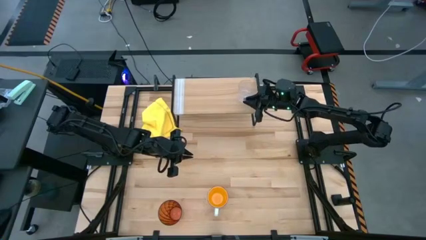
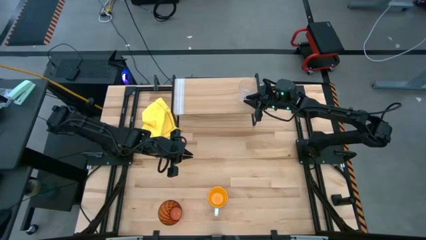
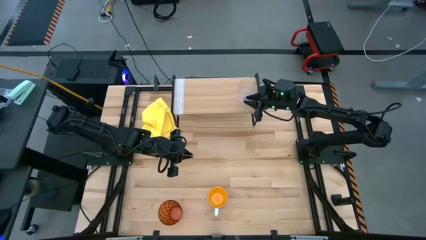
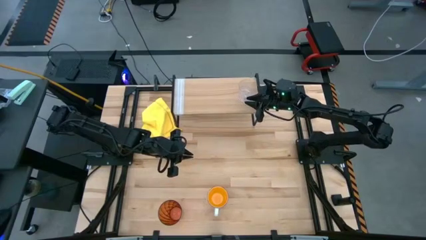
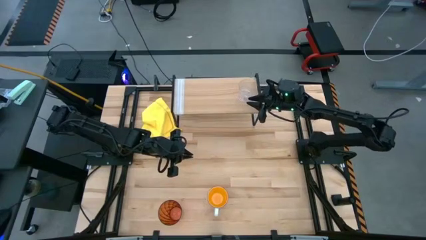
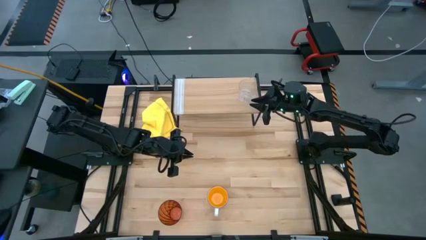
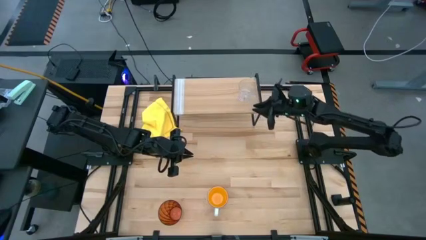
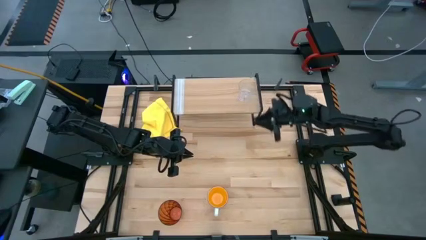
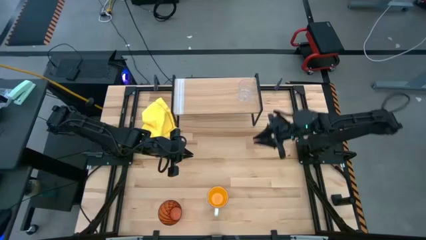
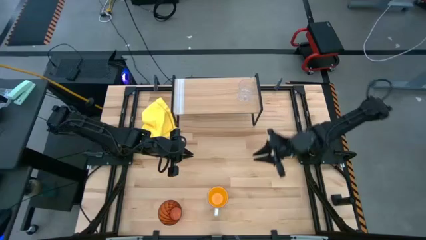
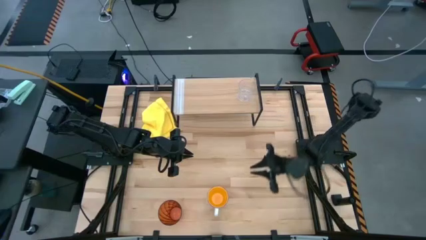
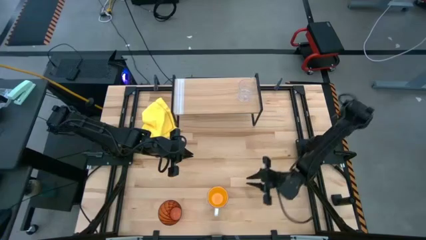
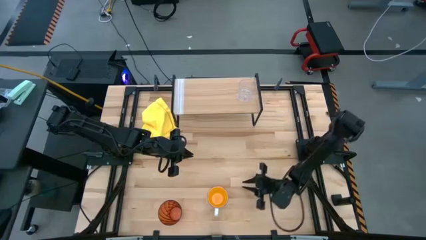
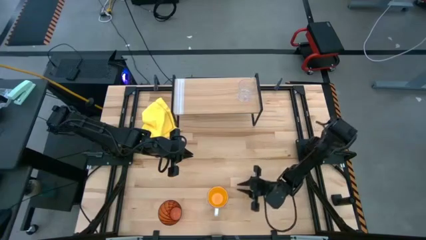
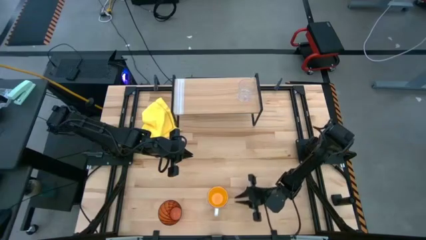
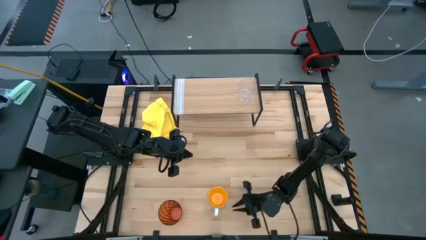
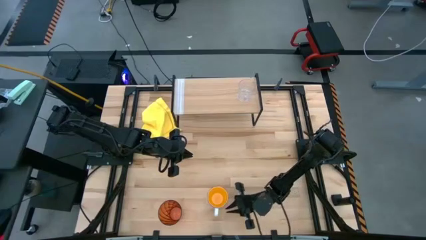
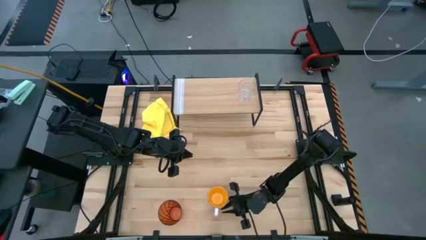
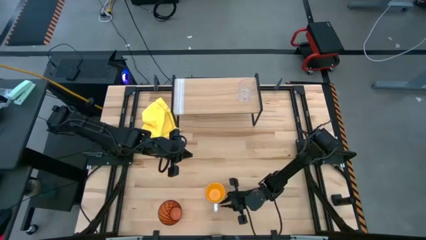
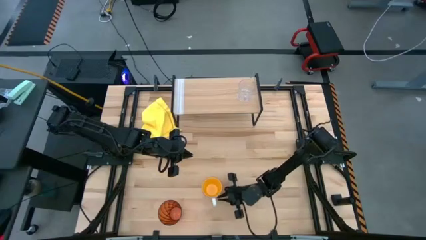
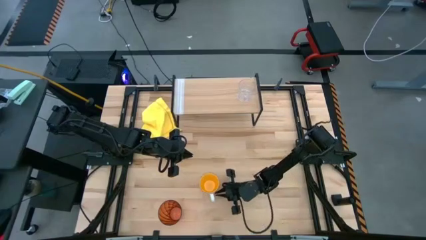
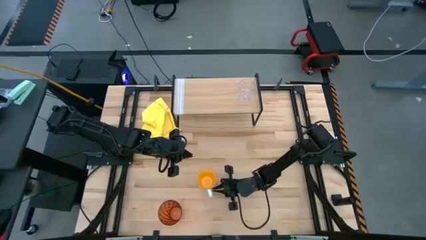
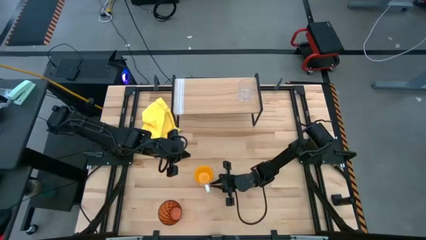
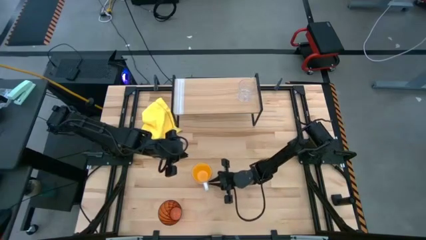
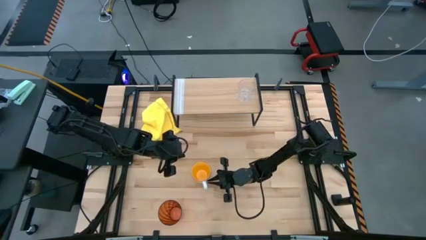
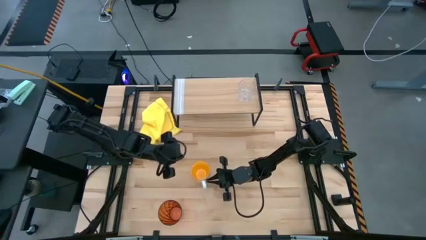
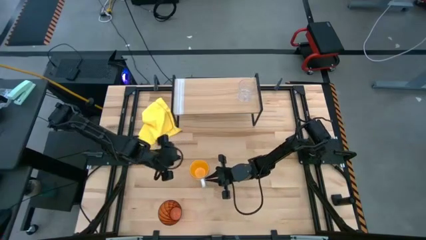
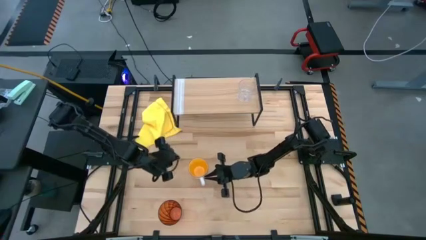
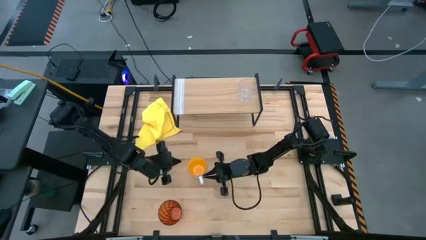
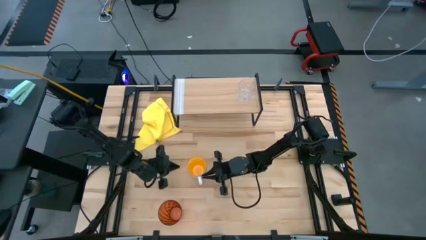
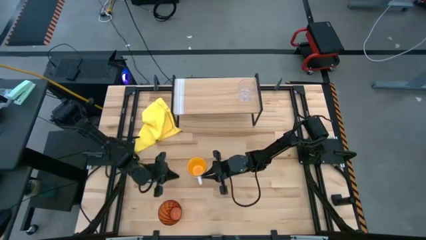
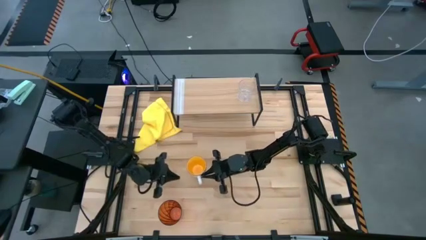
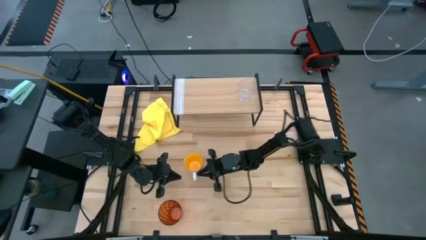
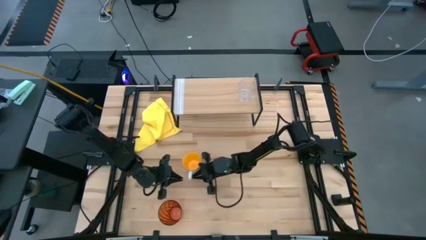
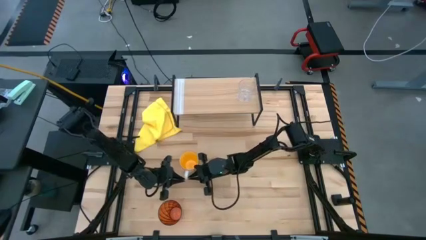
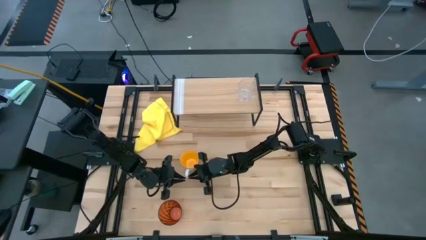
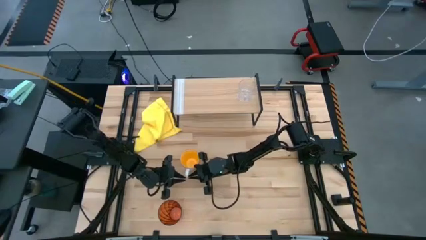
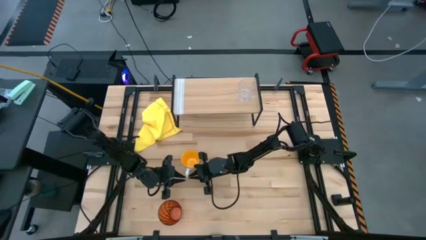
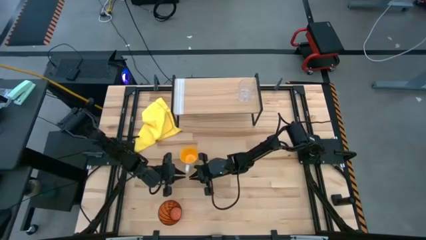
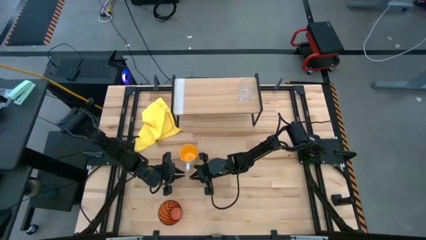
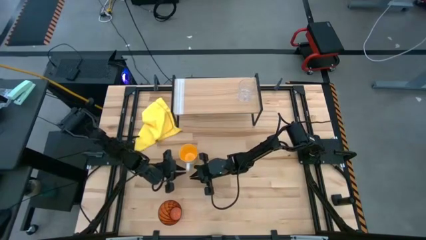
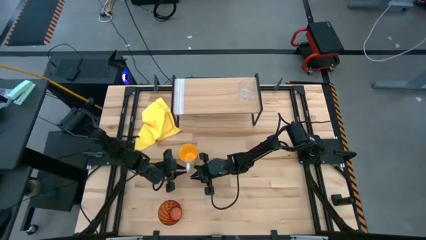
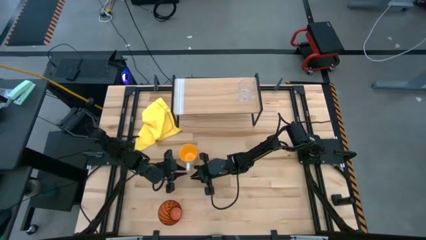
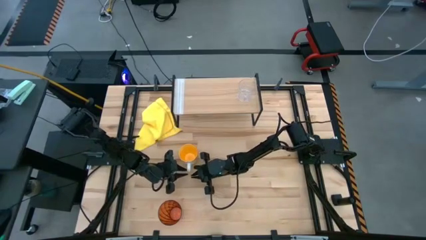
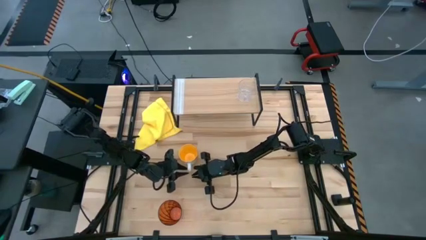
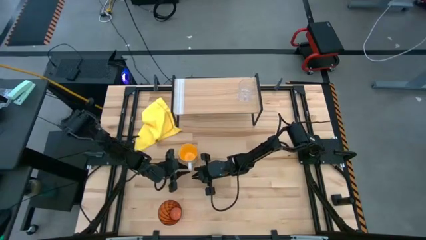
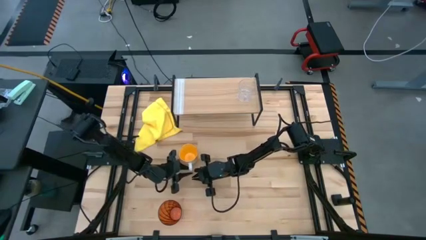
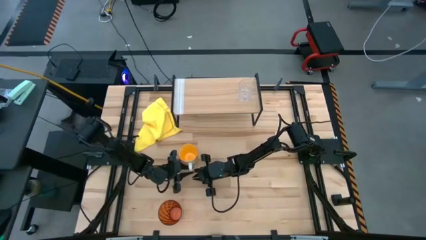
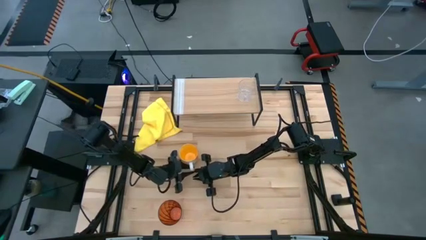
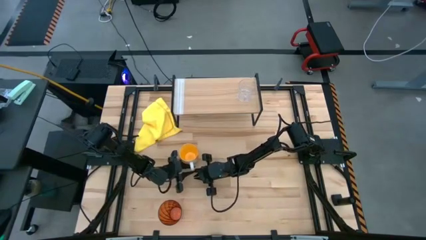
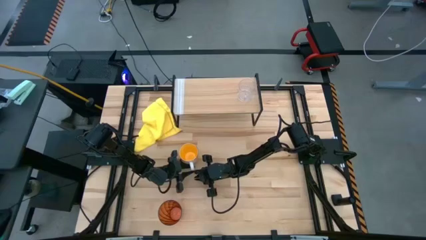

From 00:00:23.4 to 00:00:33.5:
Task: Stack small to large cups/mugs on shelf
Put the yellow mug on the shelf
